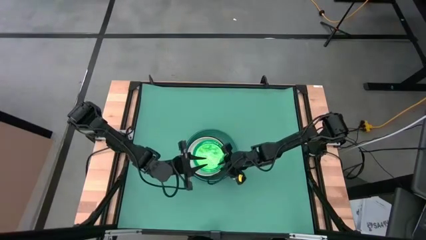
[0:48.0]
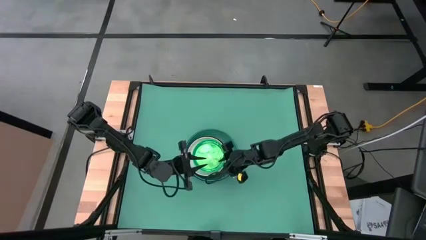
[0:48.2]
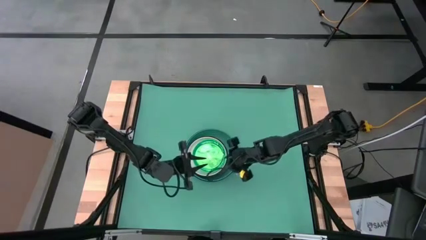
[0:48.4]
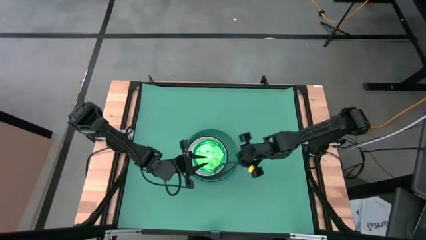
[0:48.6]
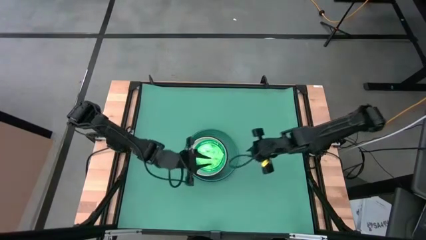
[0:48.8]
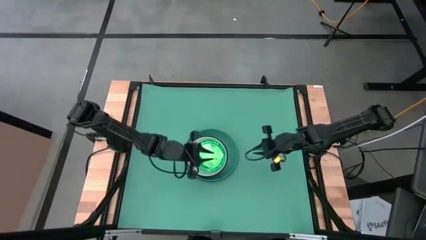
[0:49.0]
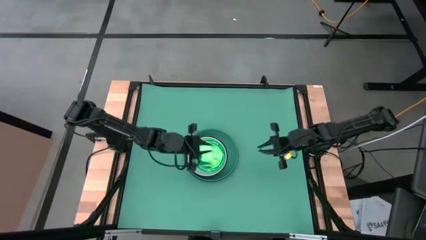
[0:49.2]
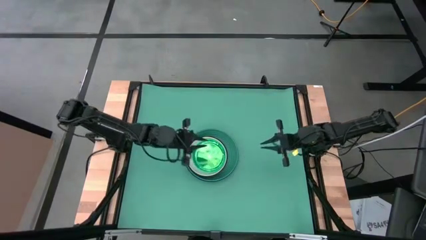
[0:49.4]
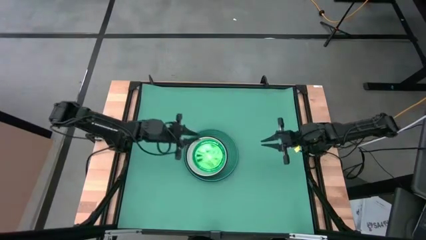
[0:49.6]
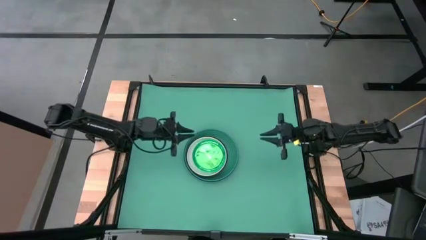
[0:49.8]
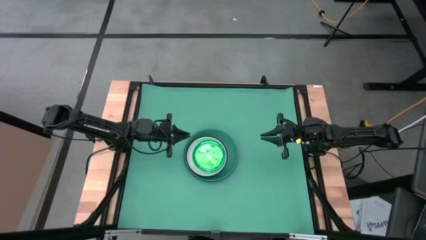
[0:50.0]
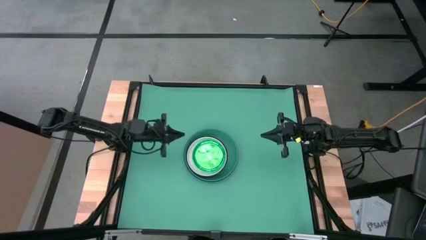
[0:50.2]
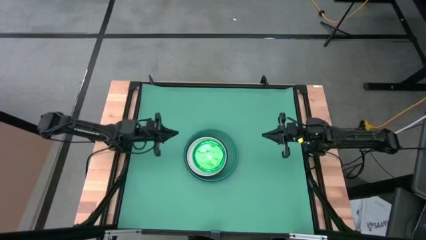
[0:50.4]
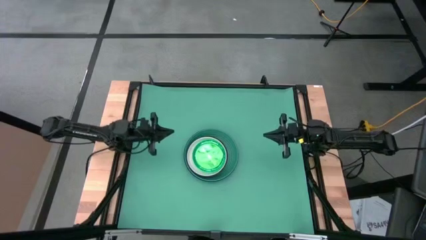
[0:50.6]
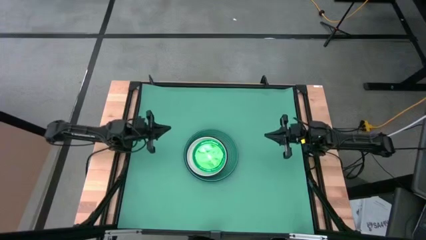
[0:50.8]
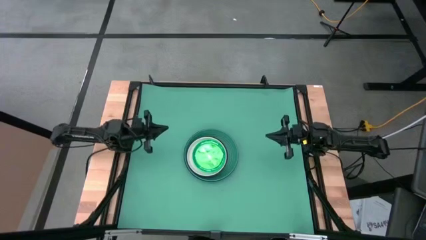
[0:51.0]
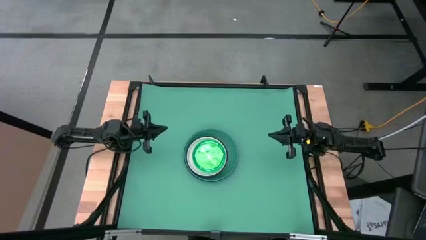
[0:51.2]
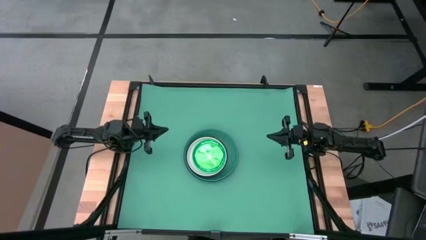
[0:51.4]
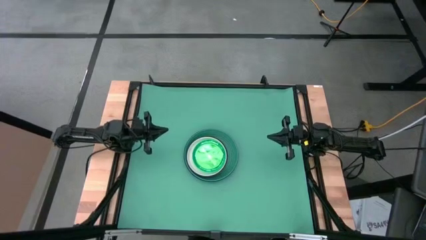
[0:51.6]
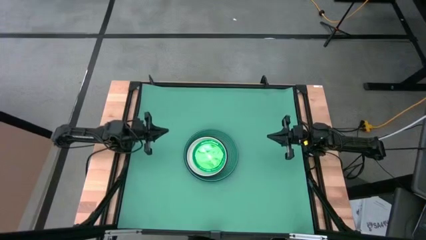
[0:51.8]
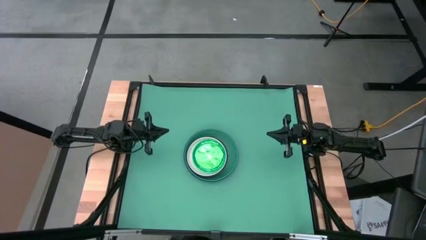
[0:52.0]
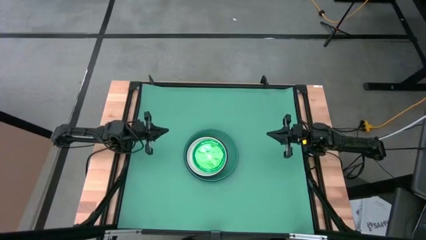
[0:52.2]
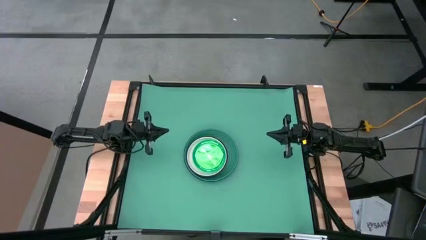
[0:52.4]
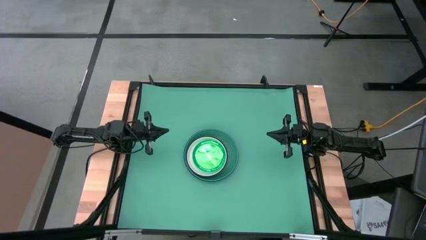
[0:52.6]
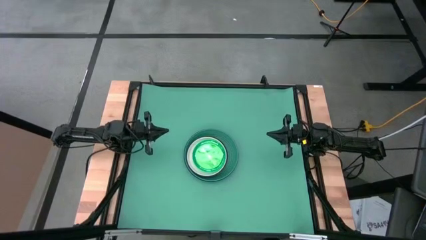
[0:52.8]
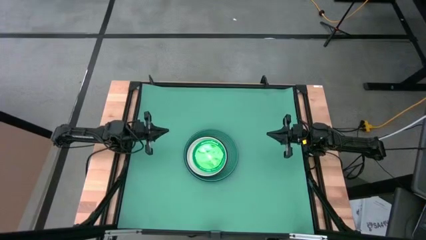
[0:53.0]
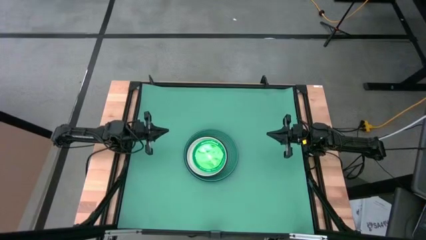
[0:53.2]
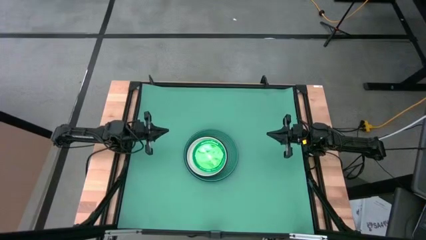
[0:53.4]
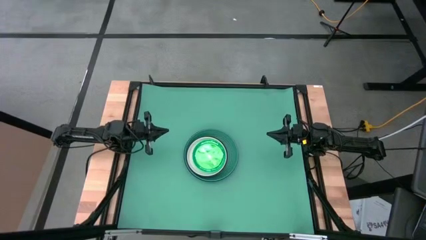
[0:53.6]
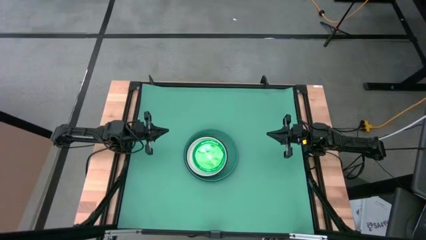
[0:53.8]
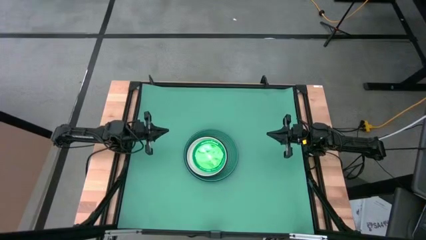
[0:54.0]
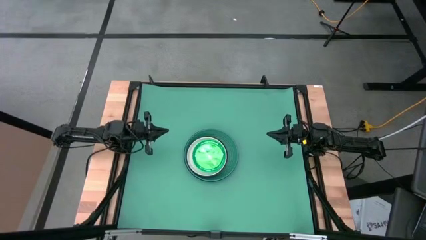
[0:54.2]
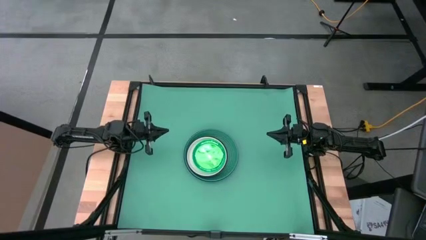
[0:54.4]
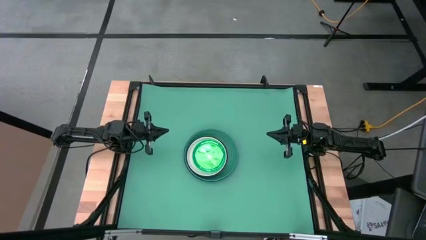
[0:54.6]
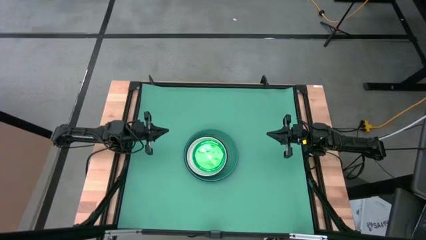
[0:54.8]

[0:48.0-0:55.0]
Task: Stack plastic plates
Return to Home Position

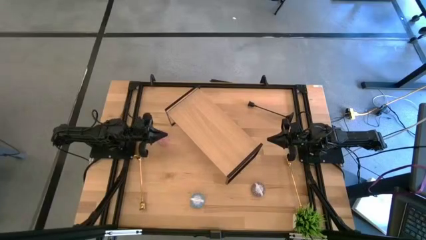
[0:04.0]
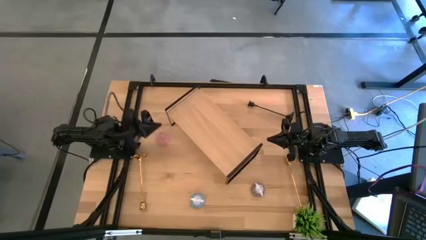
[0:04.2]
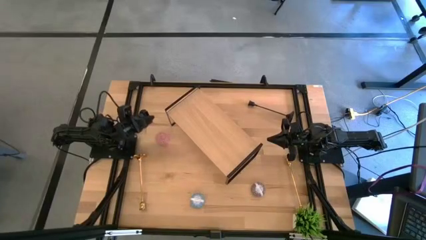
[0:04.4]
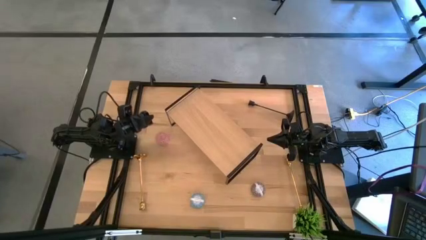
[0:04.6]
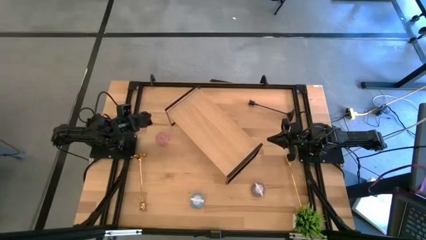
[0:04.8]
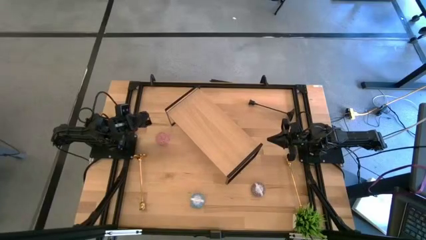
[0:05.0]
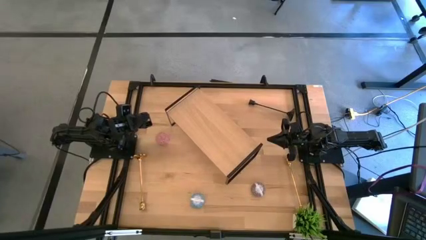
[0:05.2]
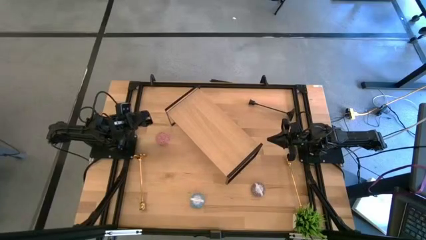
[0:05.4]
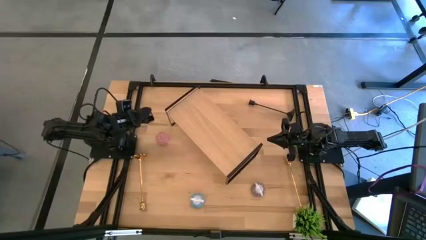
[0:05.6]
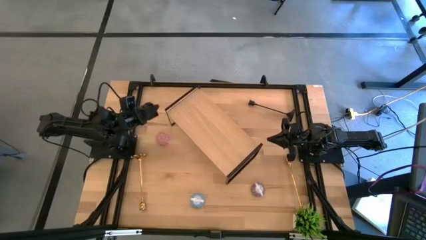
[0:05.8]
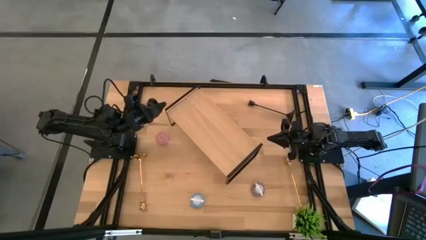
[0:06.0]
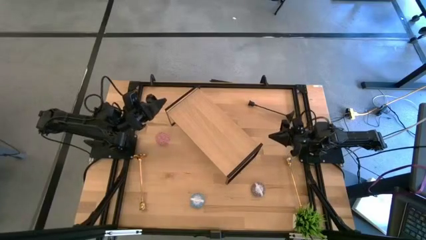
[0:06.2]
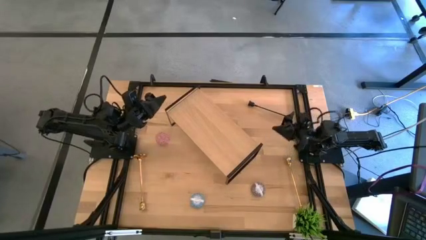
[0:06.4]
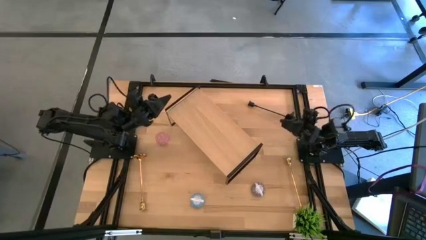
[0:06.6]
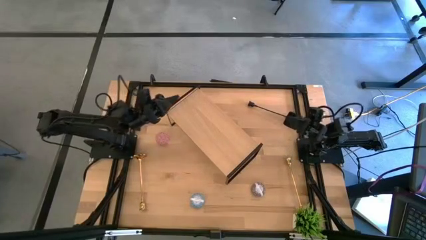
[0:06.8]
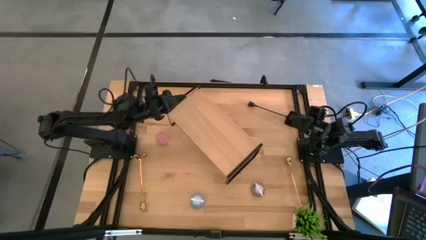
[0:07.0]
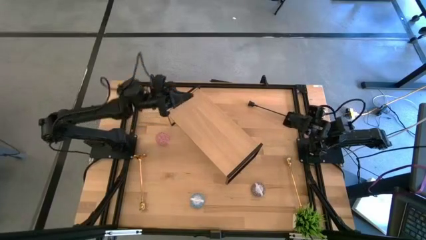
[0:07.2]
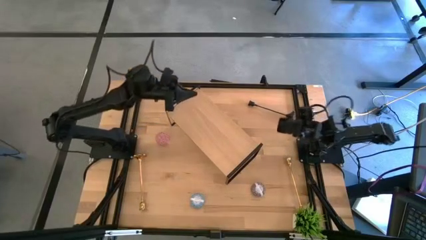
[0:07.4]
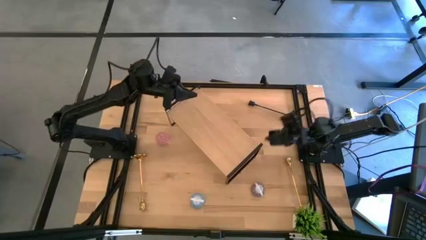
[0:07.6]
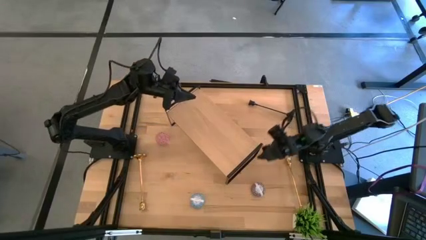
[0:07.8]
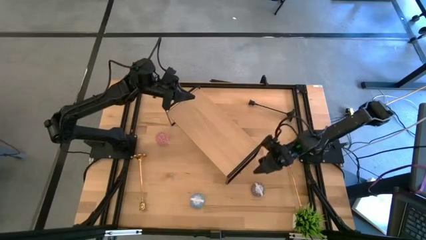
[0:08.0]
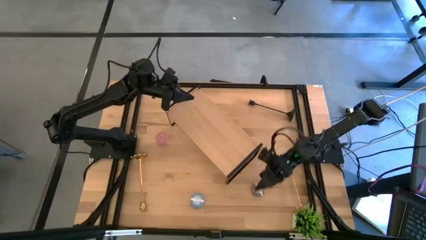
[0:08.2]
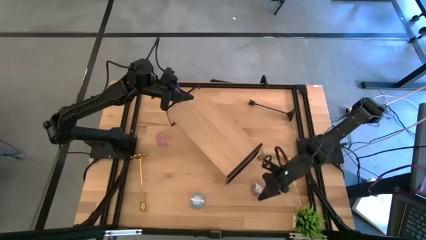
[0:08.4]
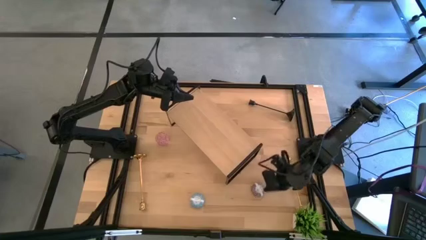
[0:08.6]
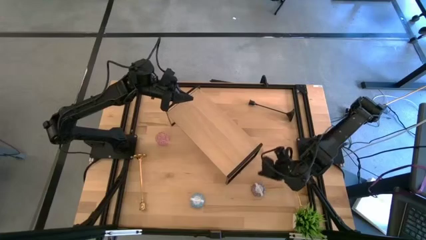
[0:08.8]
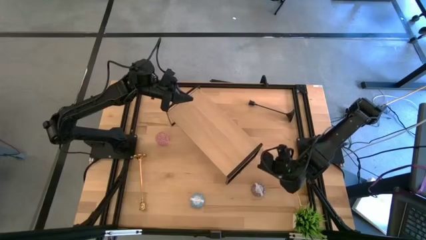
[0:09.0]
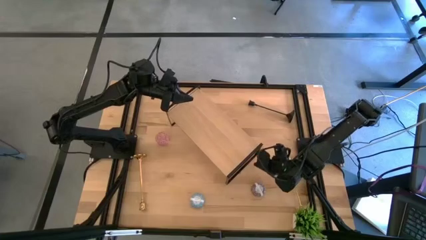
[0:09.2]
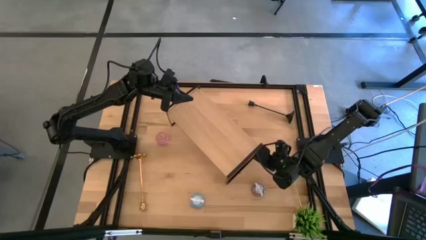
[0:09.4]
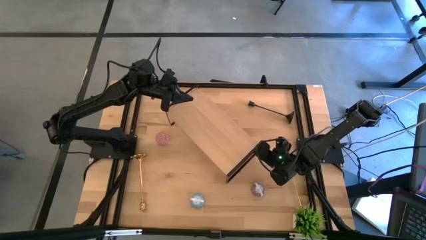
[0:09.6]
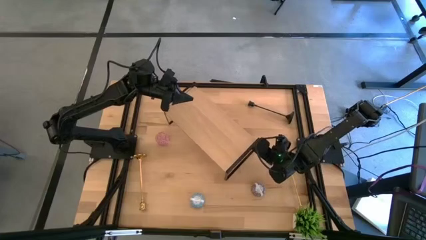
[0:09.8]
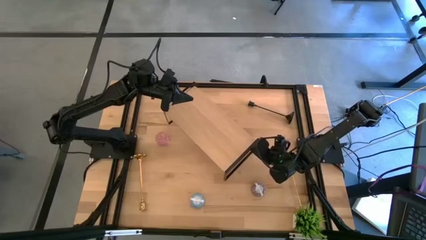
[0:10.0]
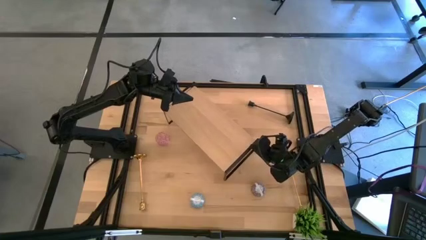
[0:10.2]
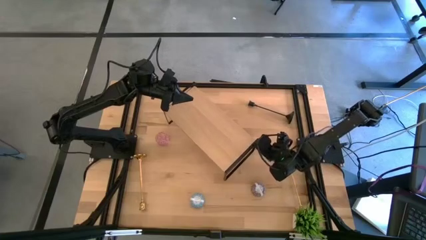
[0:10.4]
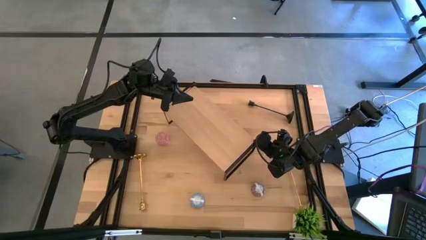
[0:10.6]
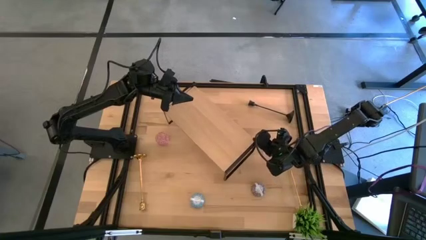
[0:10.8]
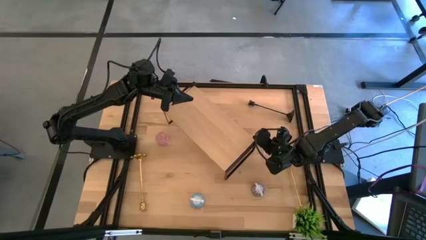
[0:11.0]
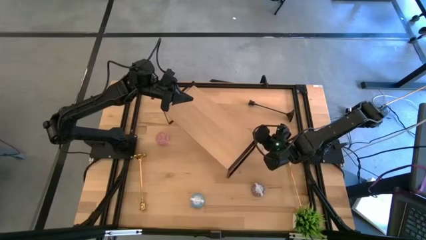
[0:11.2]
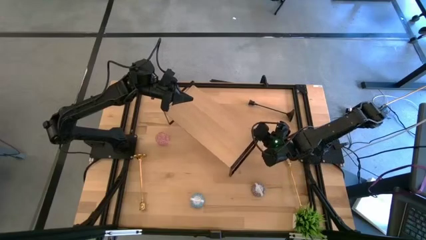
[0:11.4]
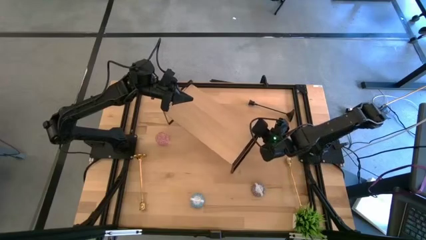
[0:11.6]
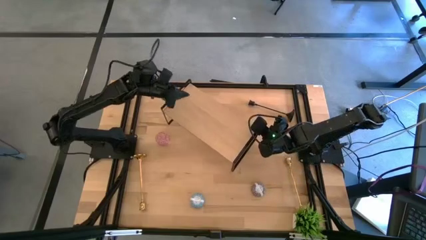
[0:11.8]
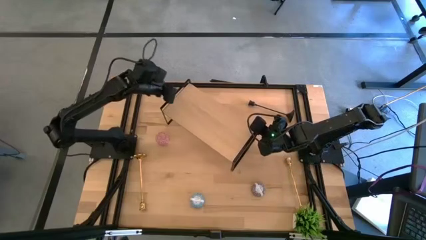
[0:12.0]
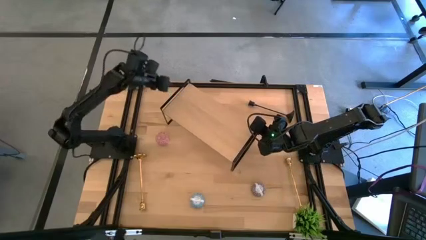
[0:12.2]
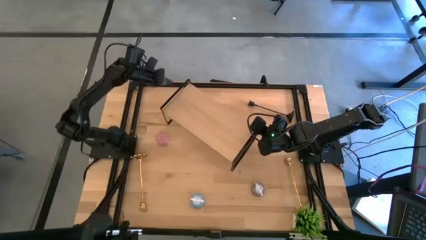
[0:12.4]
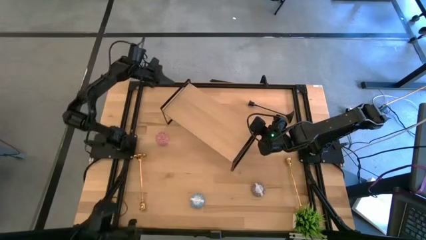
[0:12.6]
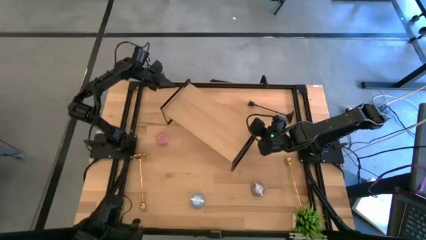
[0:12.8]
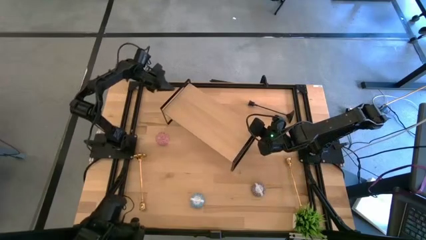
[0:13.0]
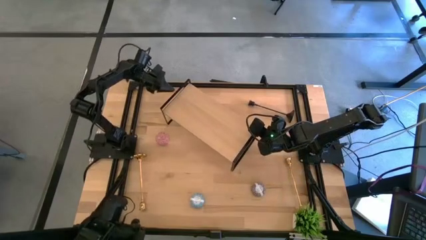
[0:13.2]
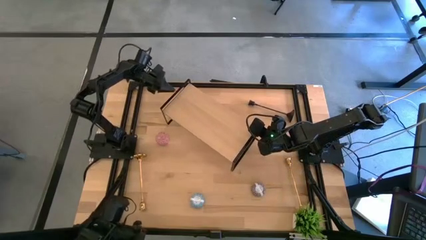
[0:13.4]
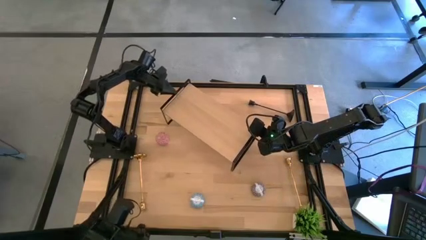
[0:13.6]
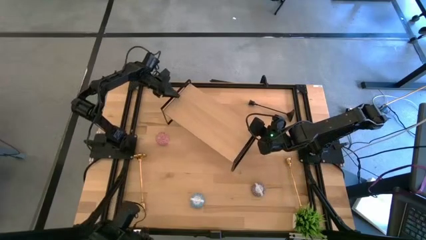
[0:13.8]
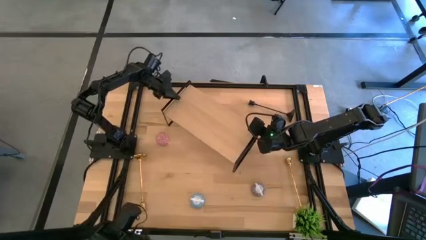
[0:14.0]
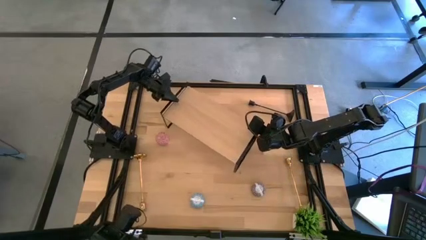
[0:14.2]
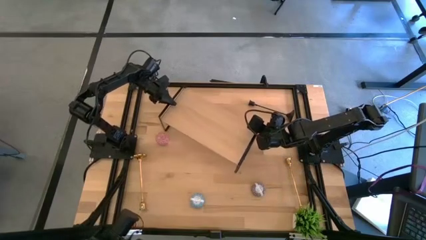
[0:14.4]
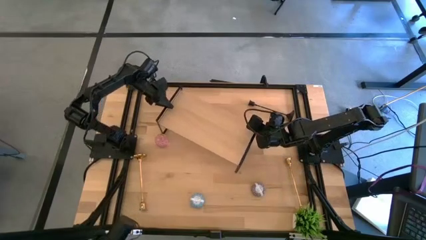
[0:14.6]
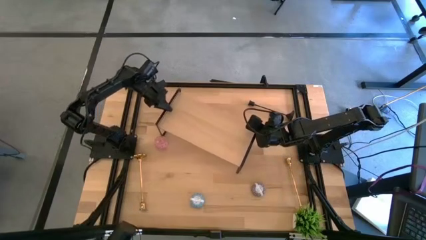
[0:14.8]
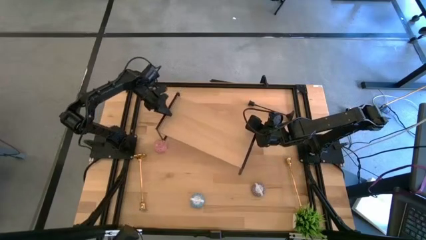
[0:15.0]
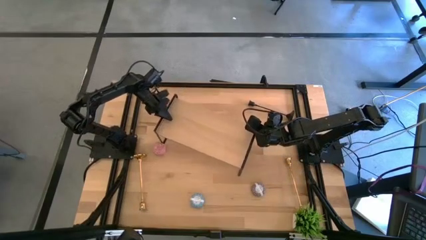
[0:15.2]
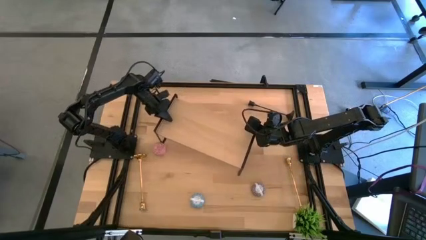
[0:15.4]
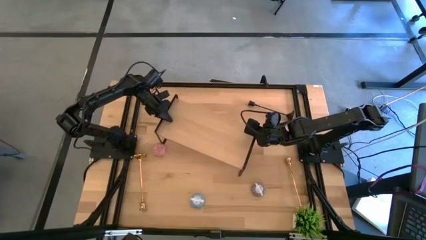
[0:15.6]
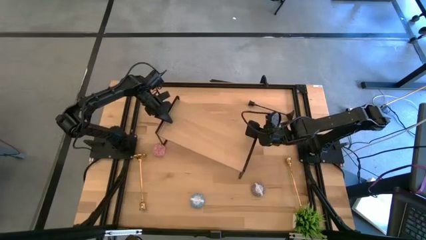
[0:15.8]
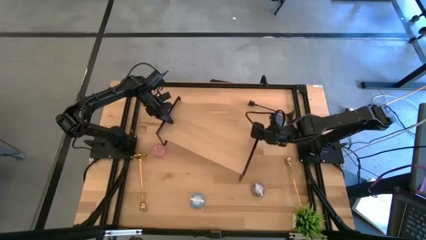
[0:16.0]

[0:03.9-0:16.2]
Task: Pick & Place candle stick holders
Adjust the shelf
